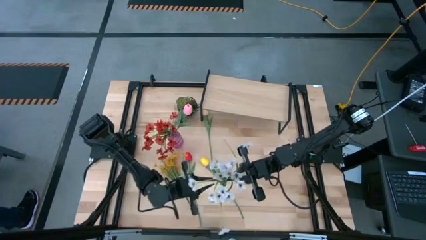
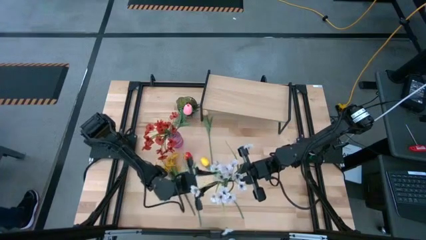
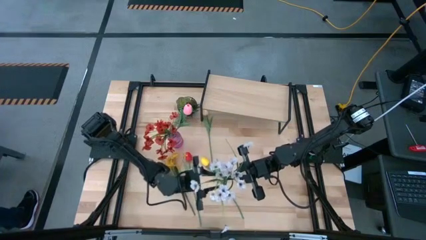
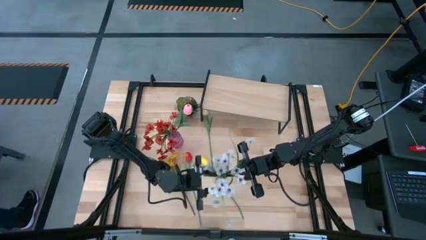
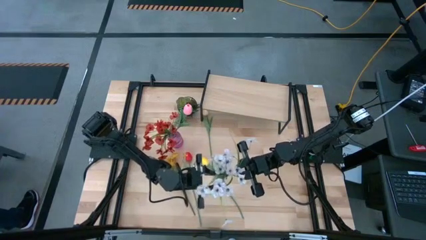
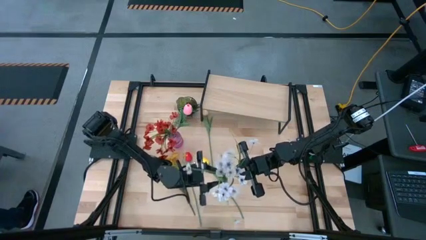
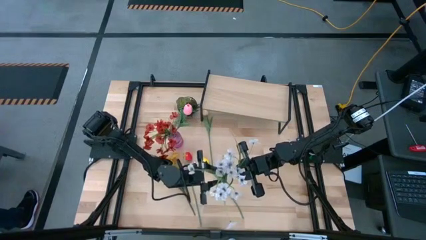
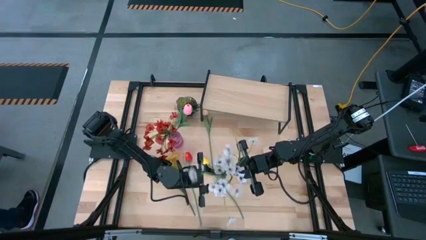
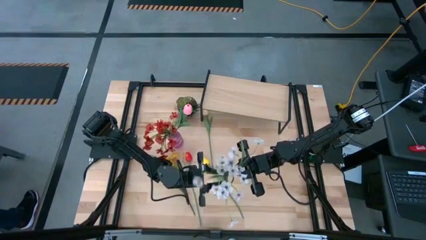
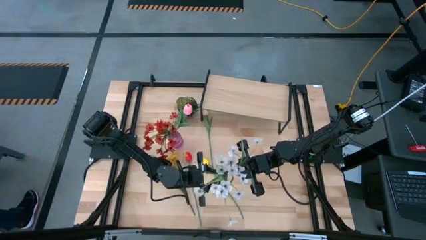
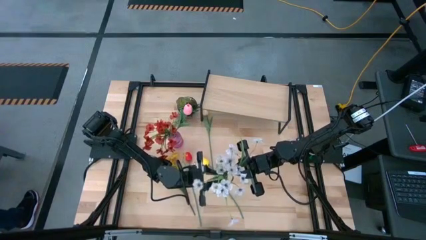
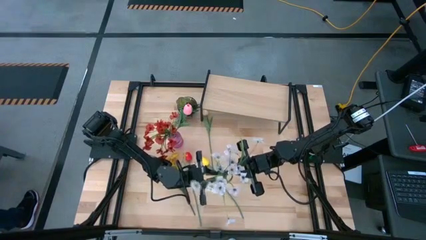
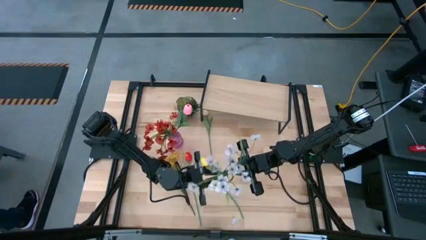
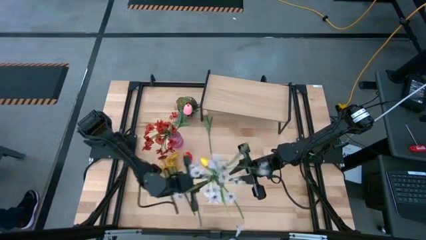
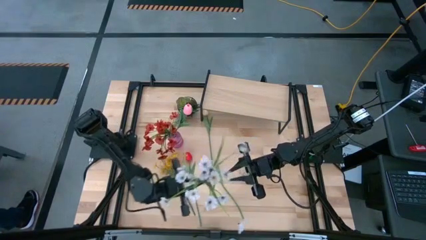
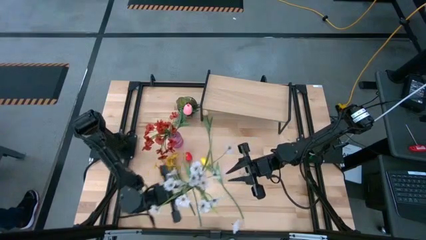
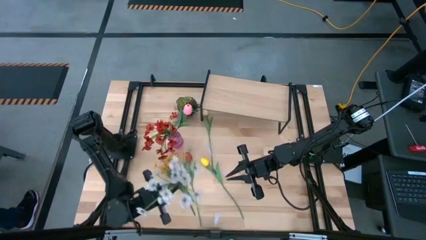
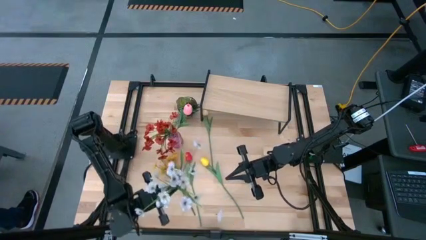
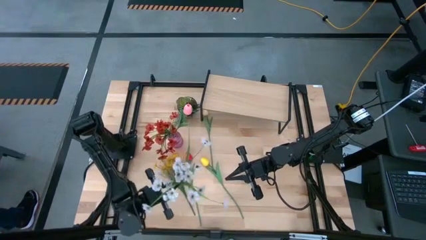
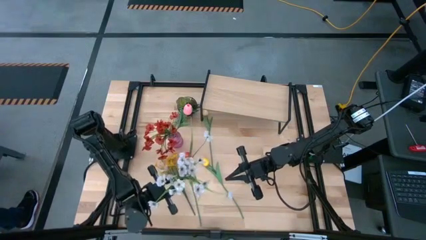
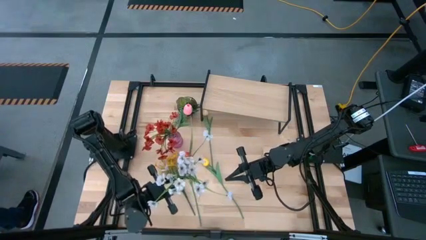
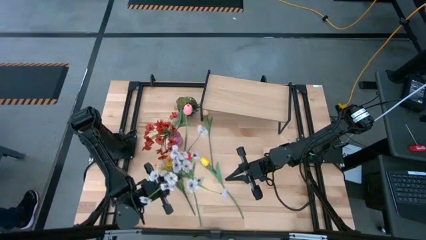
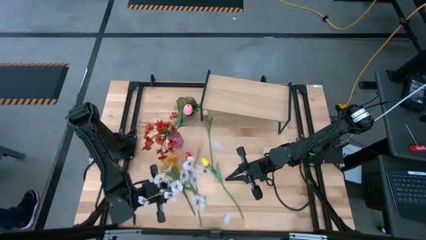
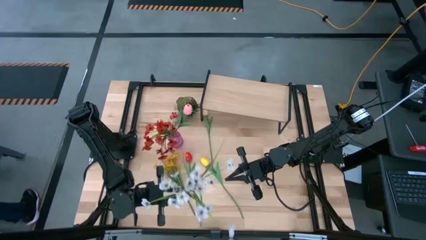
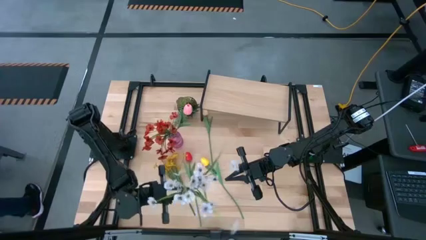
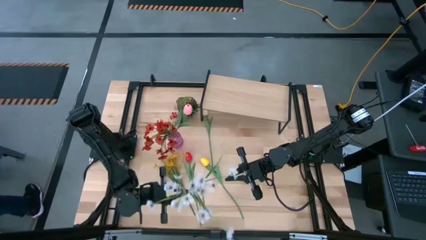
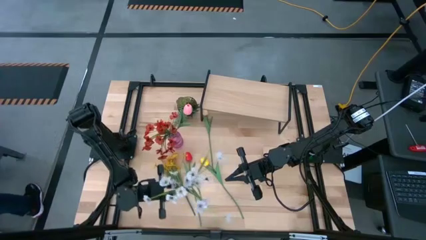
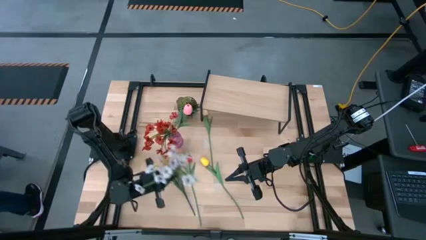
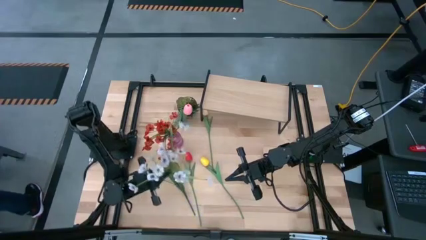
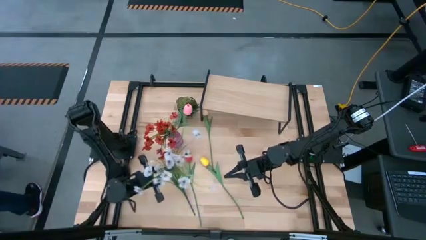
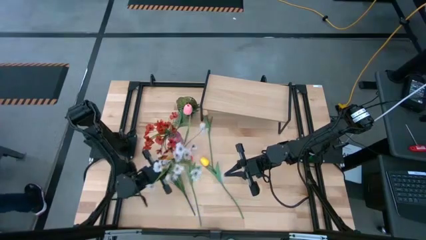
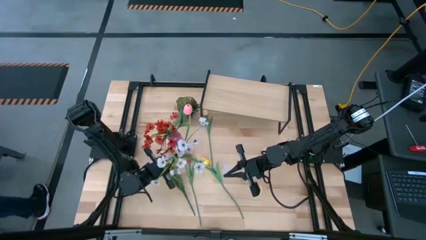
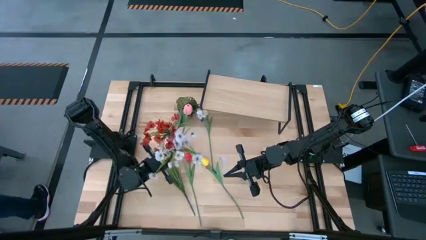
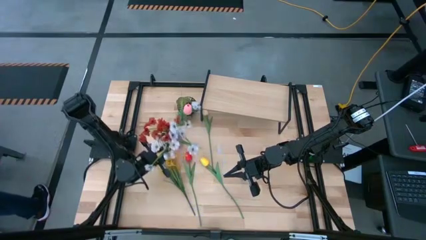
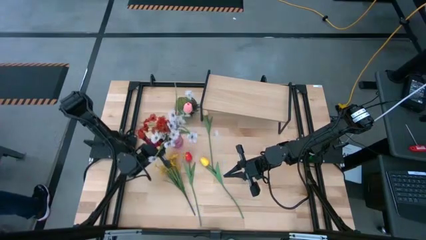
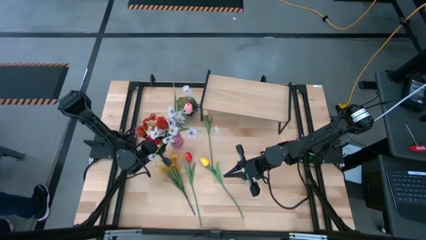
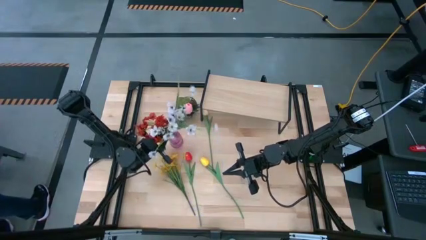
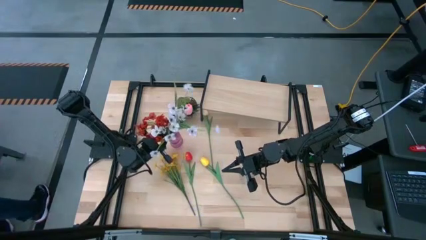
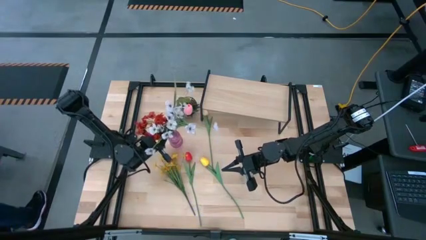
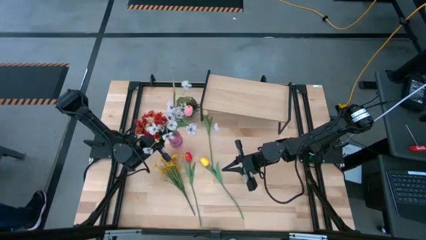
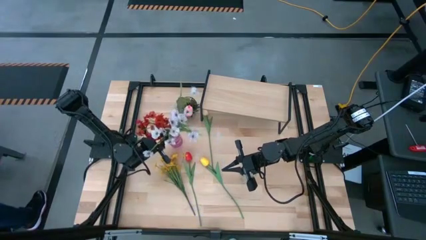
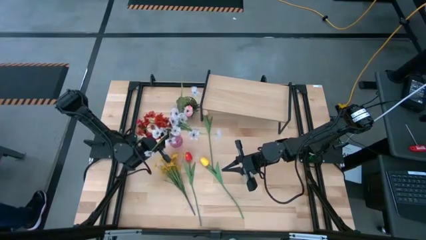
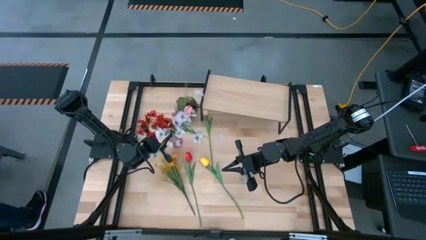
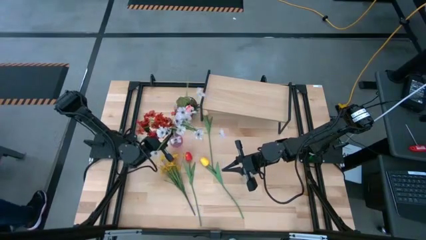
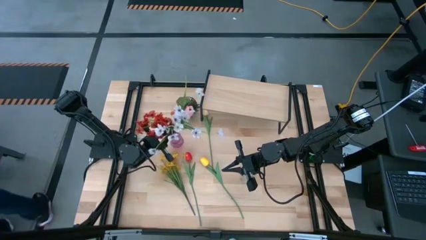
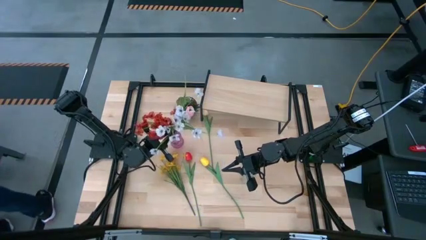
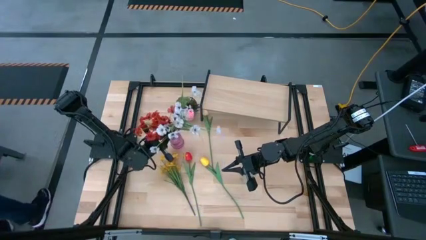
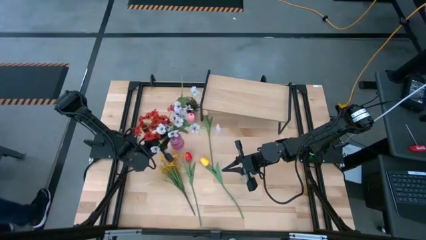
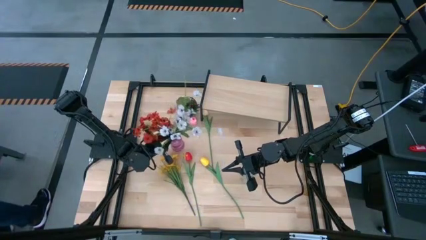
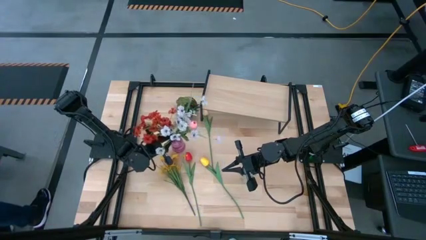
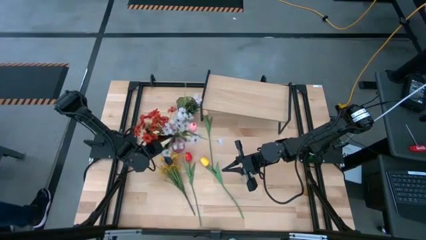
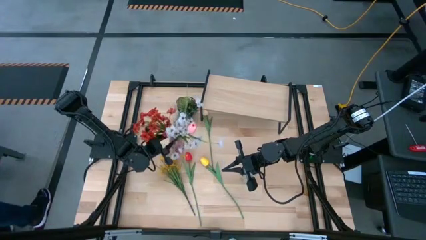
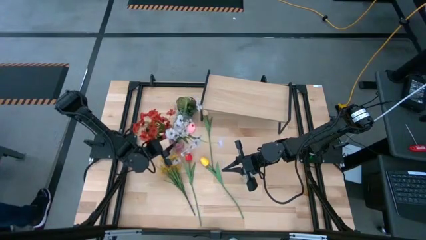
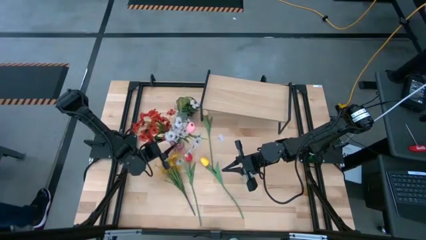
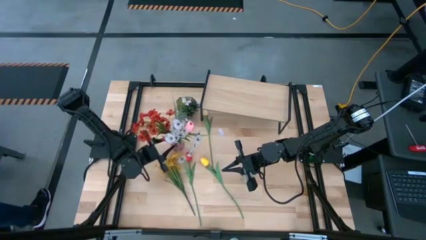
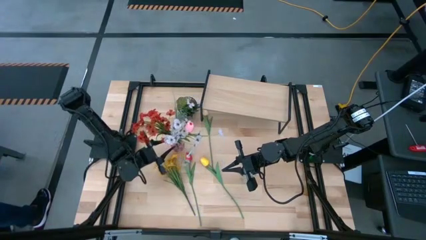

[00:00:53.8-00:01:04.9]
Task: Pick and place flowers into a vace then onto a shelf
Put the white flowers into the violet vase

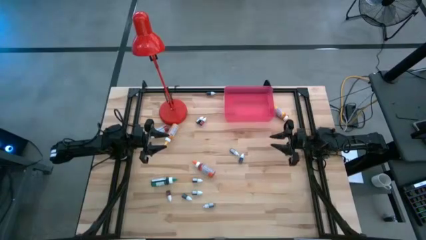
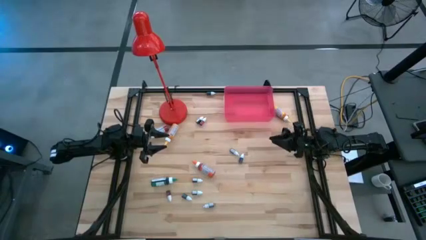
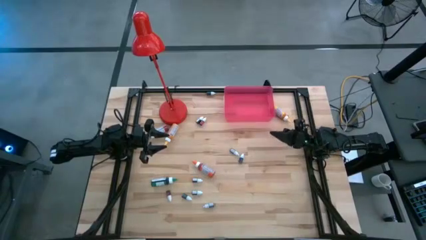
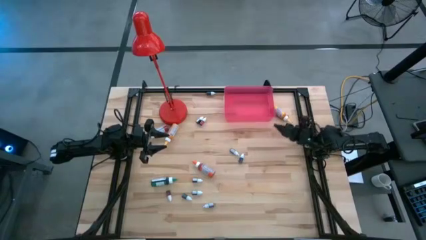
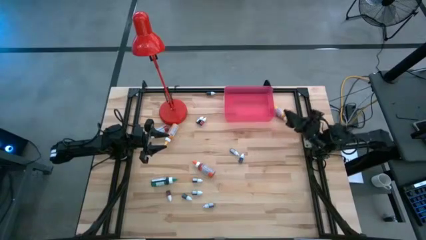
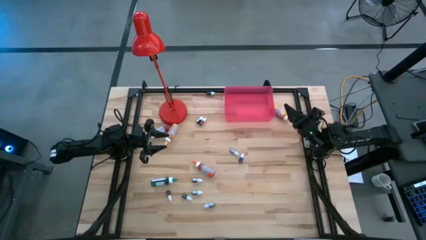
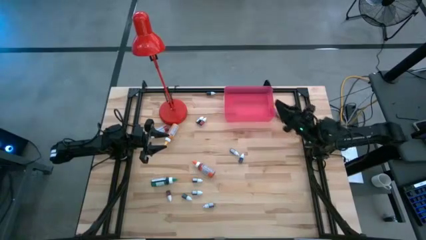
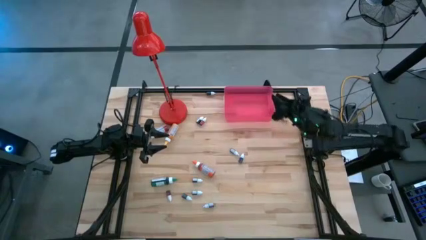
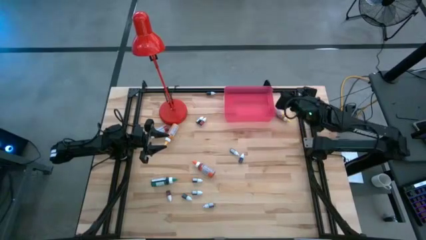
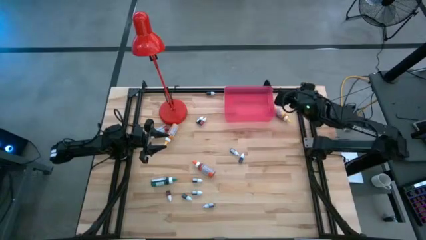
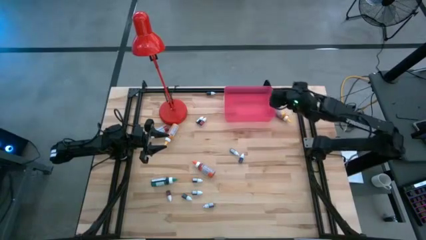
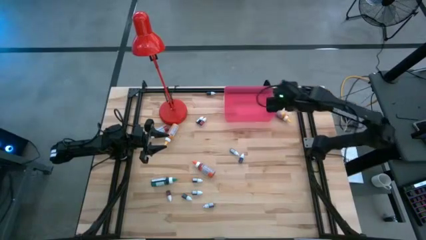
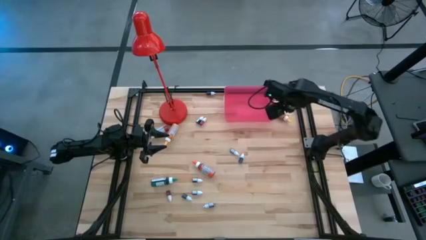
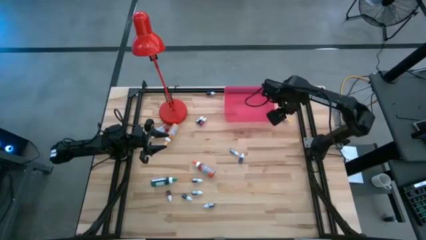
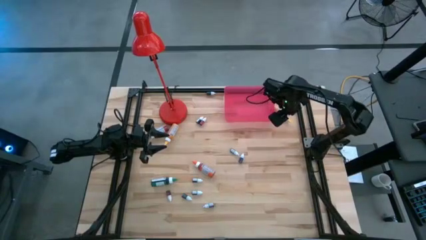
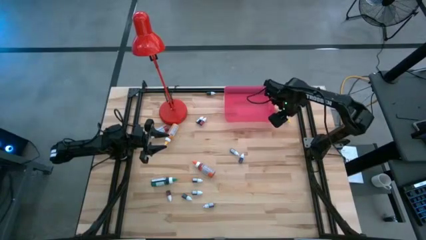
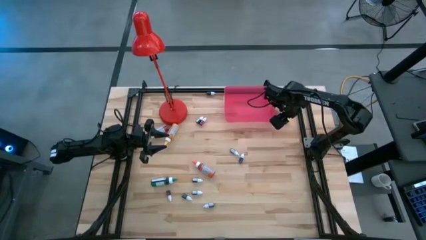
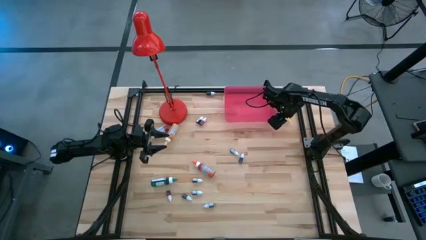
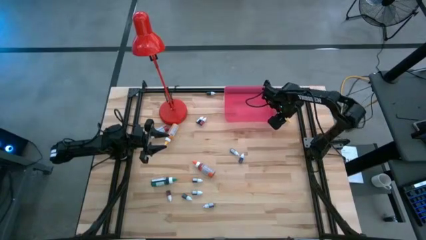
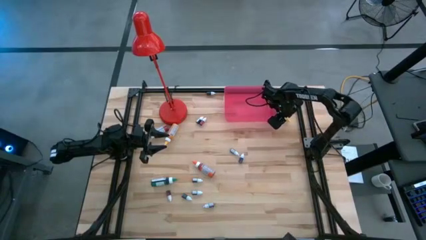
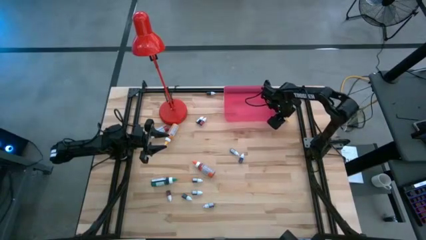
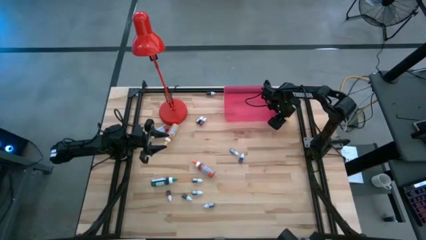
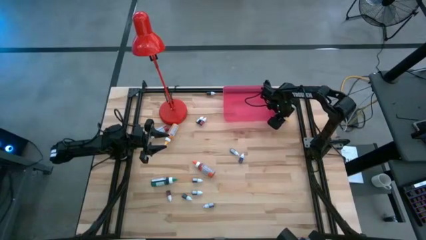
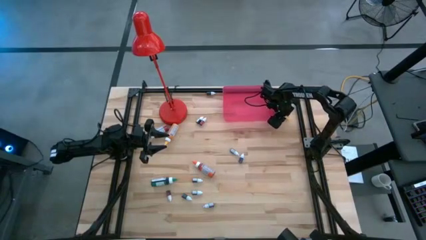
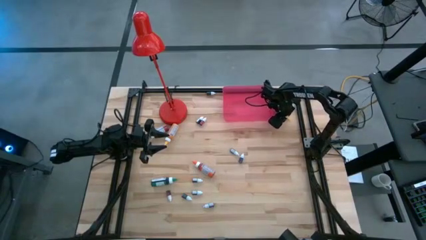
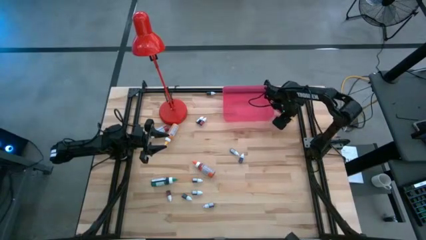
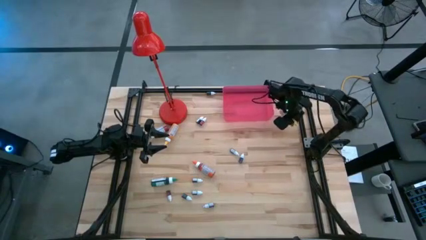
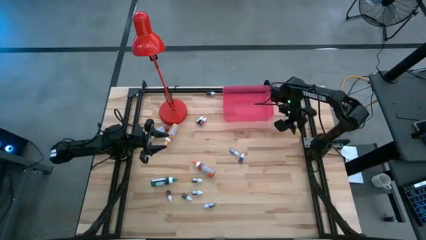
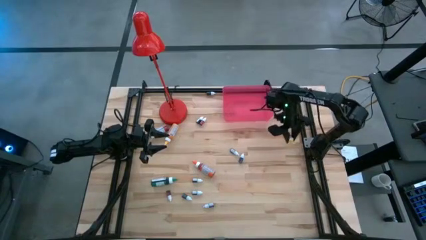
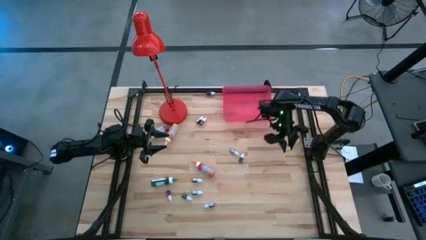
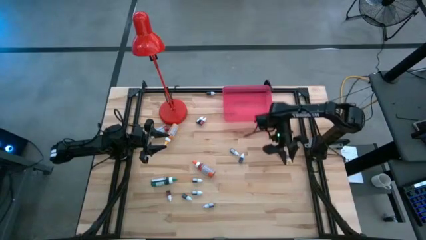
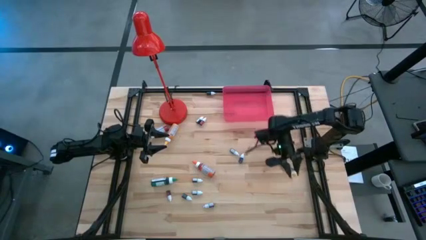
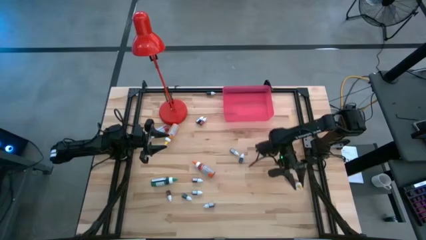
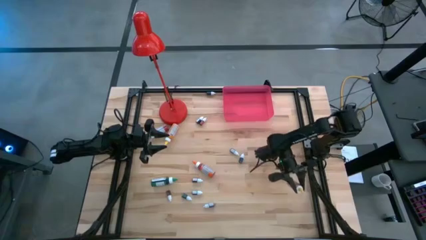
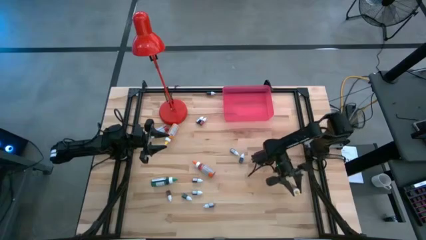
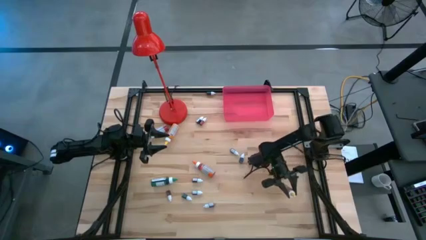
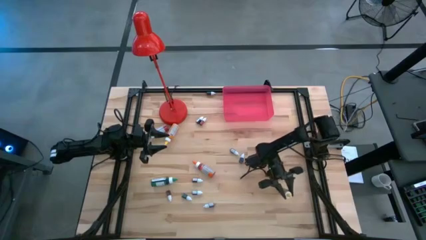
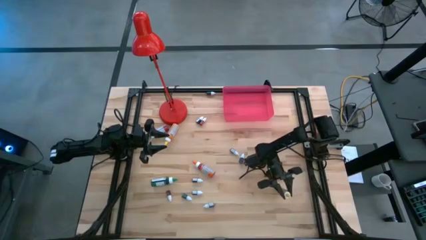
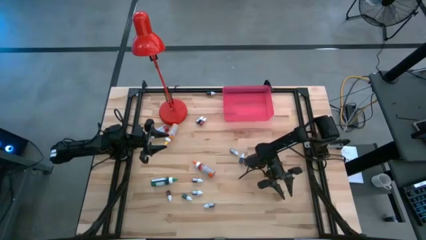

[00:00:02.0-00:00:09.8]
Task: Pick & Place food coloring
Put the large yellow food coloring bottle into the red bin
